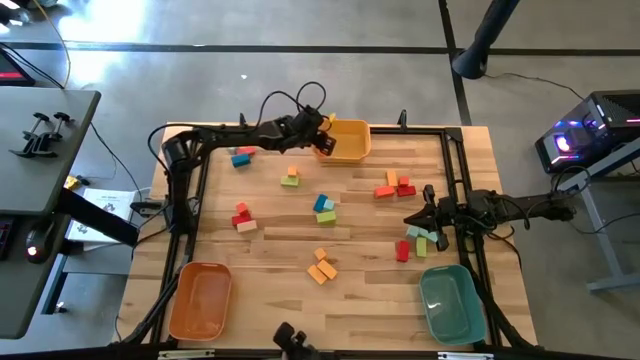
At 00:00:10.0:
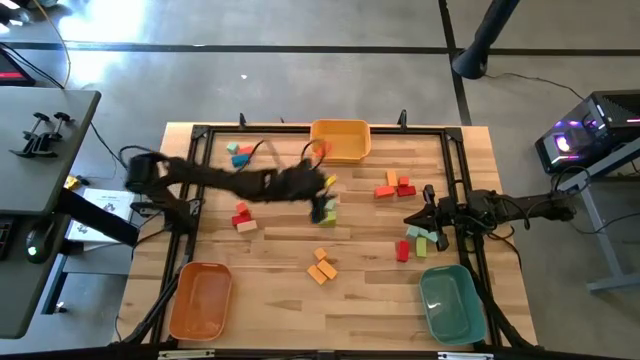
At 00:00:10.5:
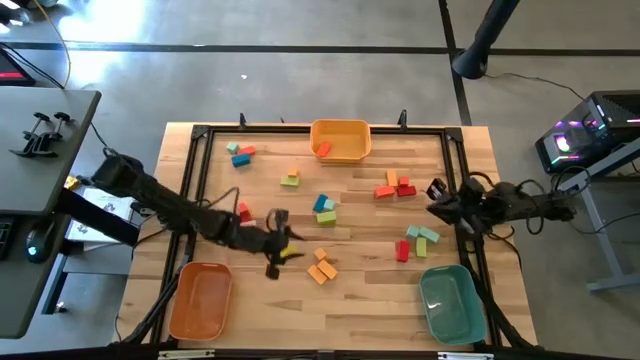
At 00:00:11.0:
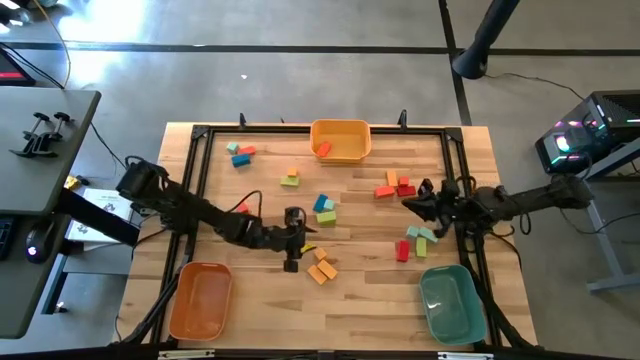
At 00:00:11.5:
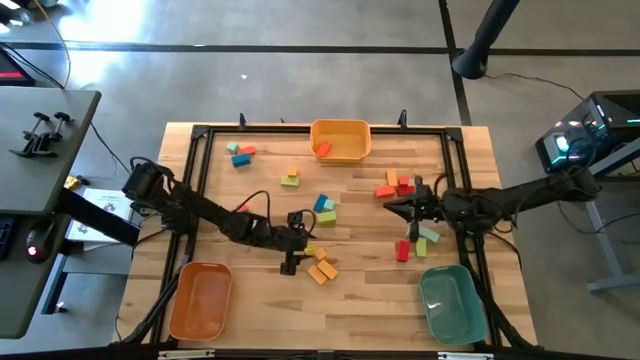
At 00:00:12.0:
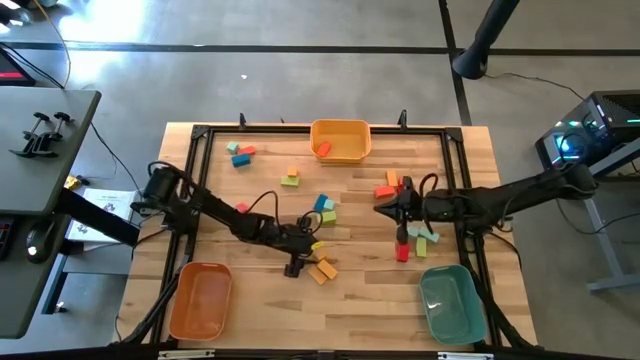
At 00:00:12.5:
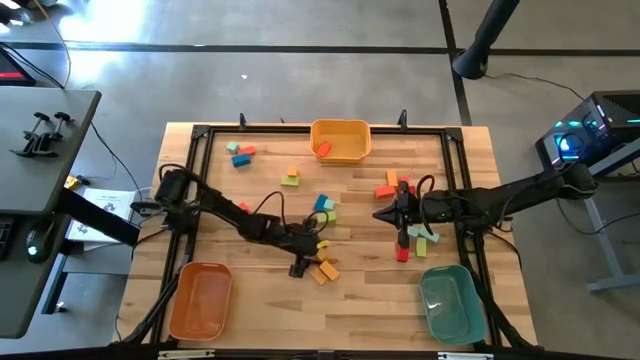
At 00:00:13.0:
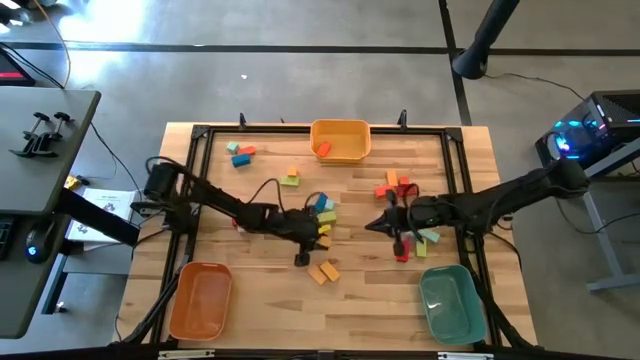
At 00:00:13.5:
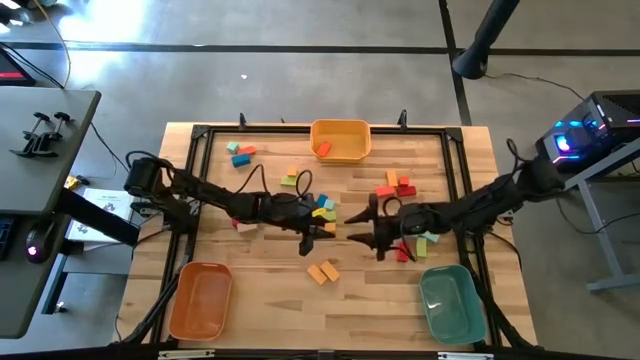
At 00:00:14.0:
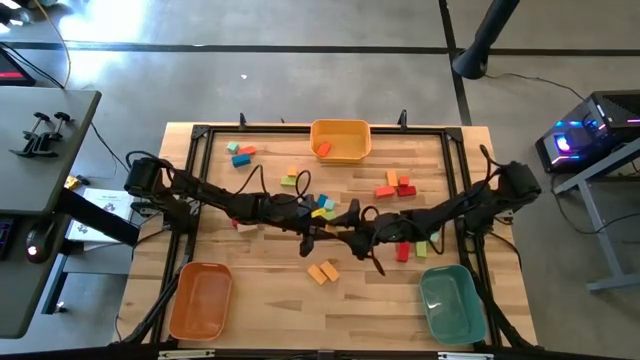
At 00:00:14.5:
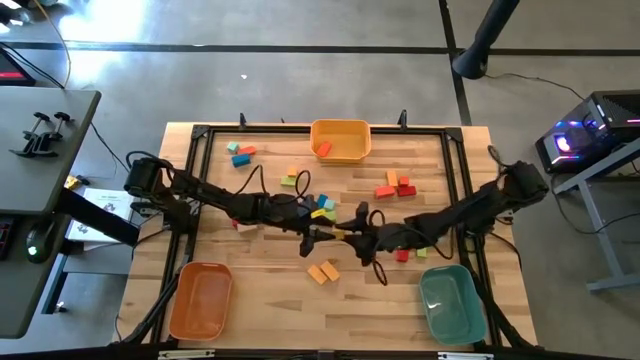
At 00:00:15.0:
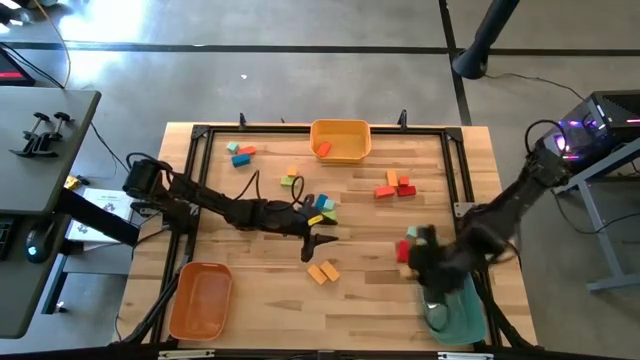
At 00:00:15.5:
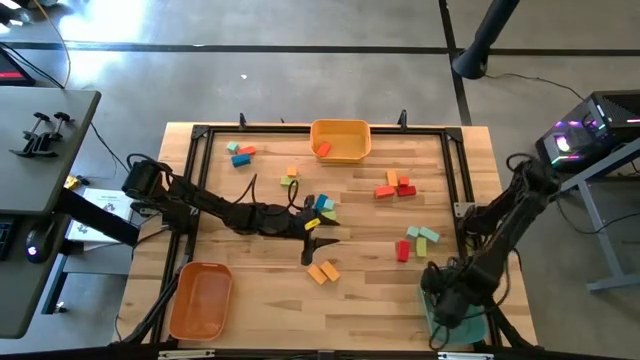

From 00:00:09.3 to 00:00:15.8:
Task: Sort blocks by size
Put the bottom yellow square block into the blue bin

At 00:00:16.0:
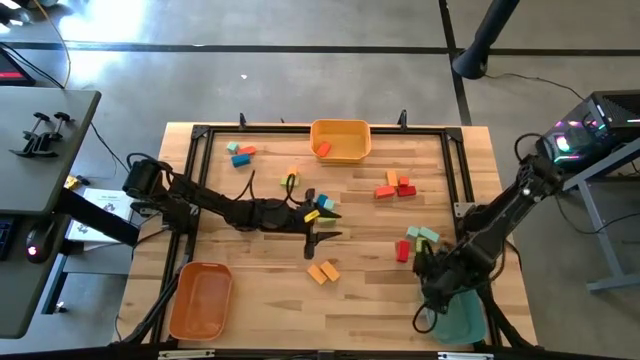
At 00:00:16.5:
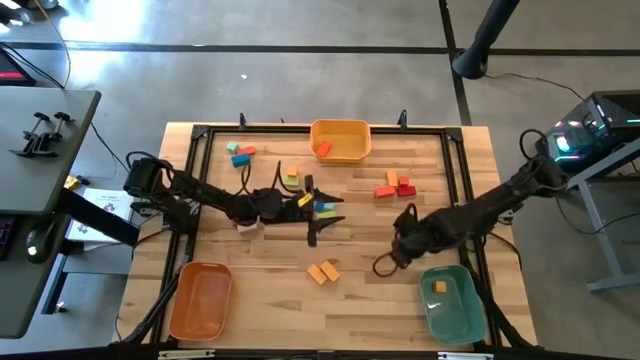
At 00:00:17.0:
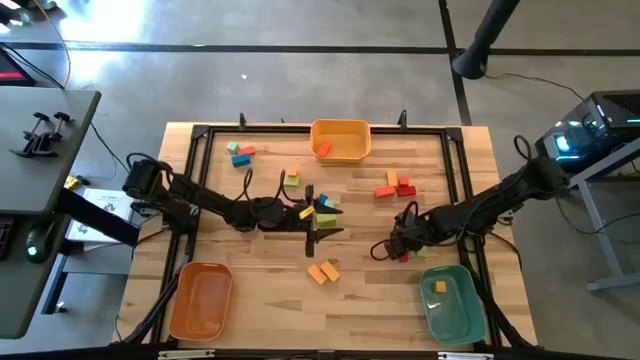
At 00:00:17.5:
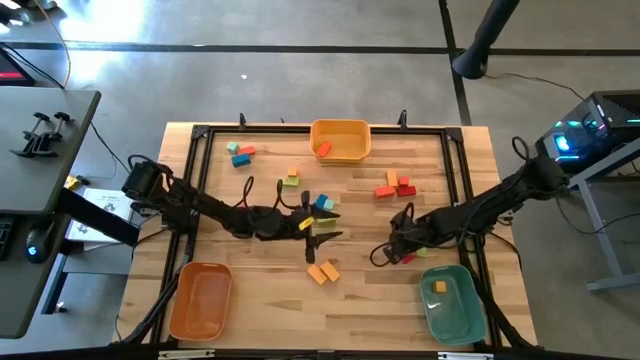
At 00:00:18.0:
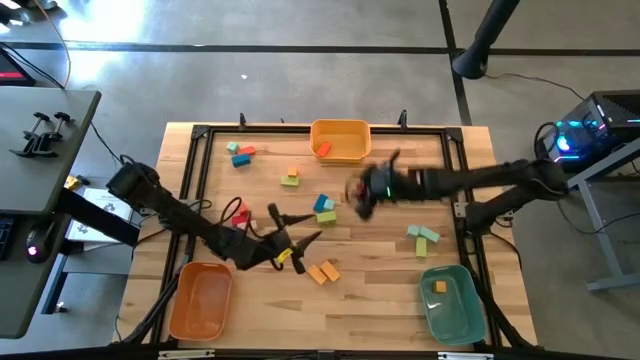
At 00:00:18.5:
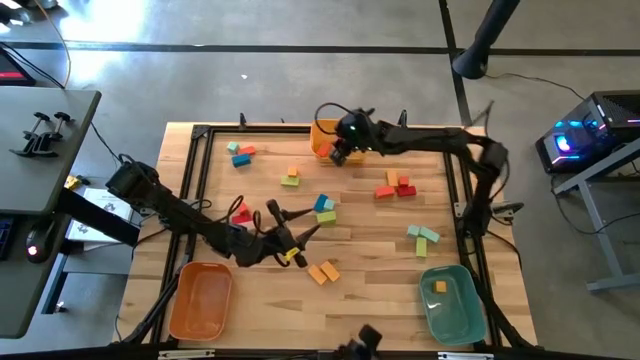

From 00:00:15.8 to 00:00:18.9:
Put the red wide rectangular block into the yellow bin

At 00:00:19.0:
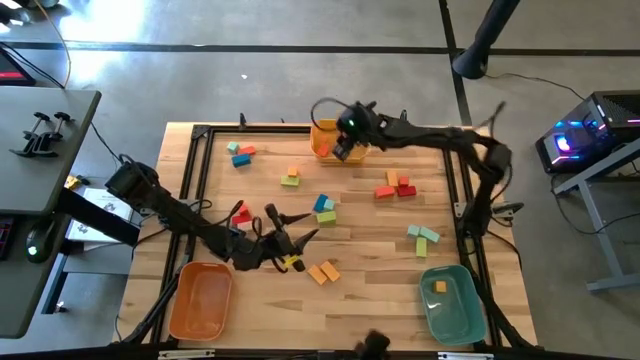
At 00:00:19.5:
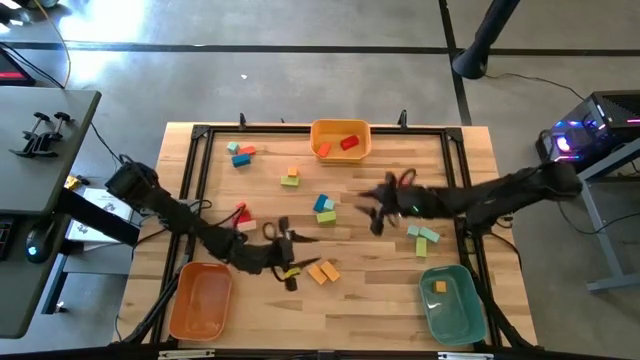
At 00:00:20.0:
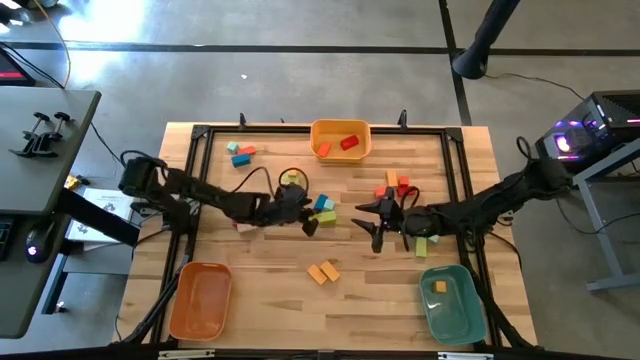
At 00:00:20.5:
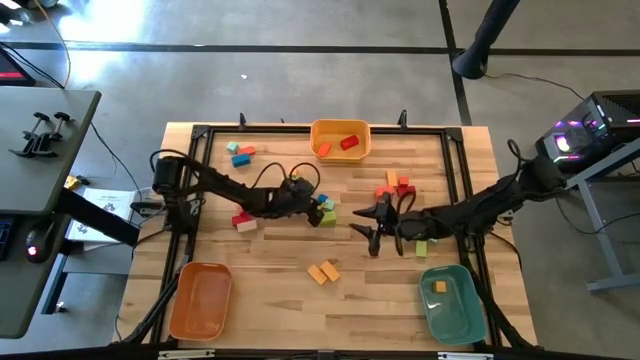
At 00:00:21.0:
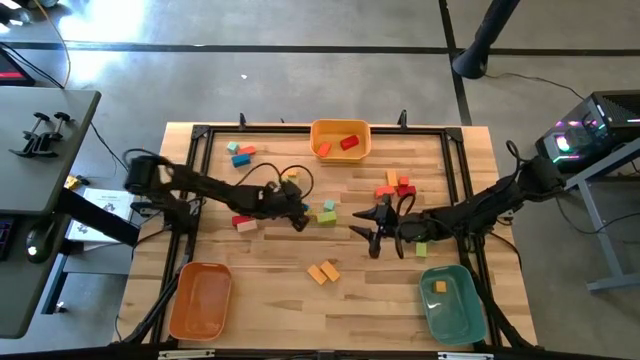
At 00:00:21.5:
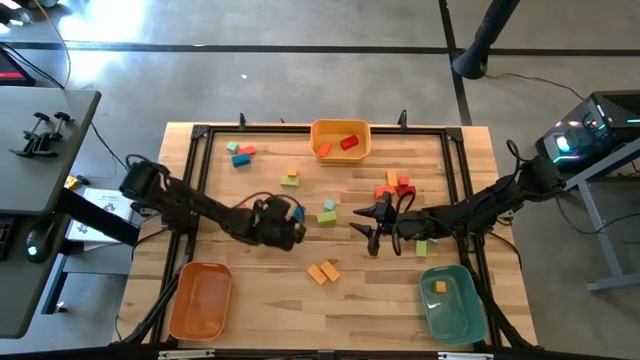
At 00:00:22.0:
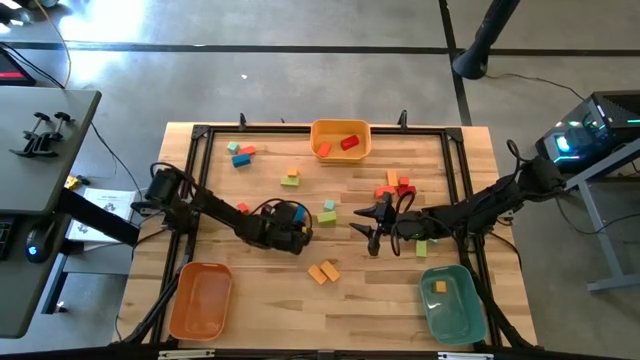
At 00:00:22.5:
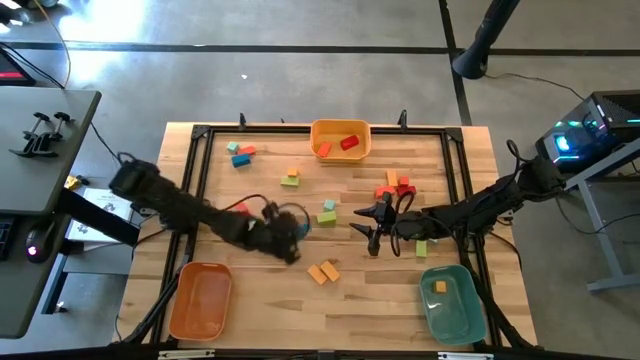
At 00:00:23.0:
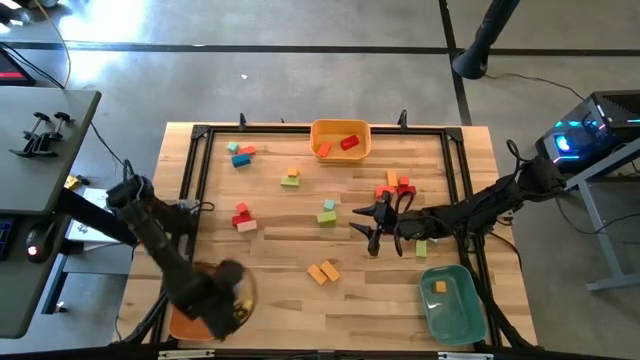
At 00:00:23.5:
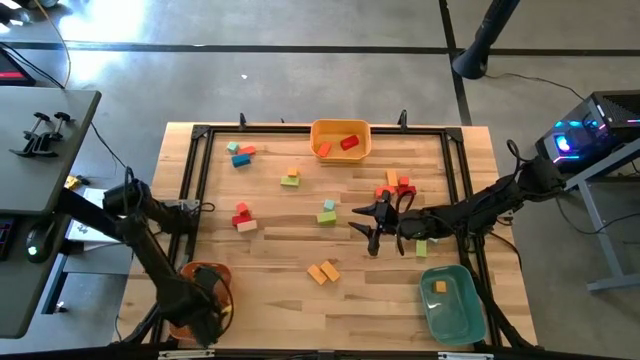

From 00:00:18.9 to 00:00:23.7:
Put the blue narrow rectangular block into the orange bin

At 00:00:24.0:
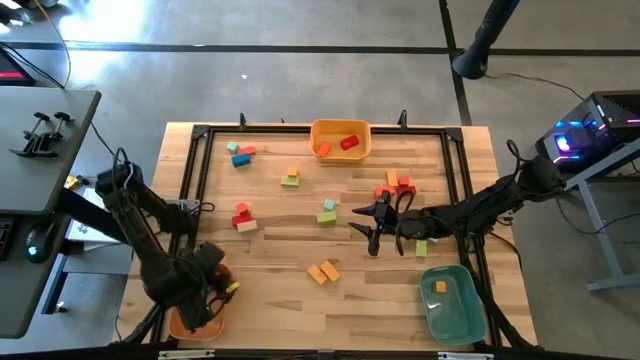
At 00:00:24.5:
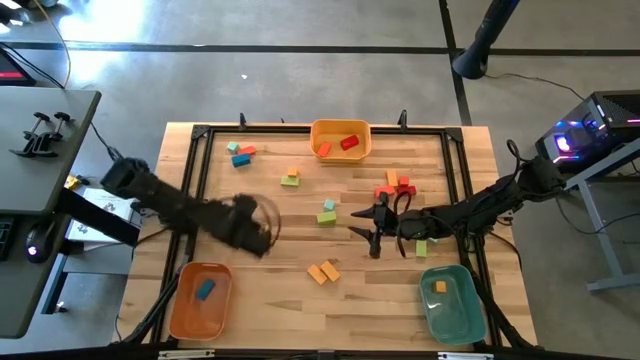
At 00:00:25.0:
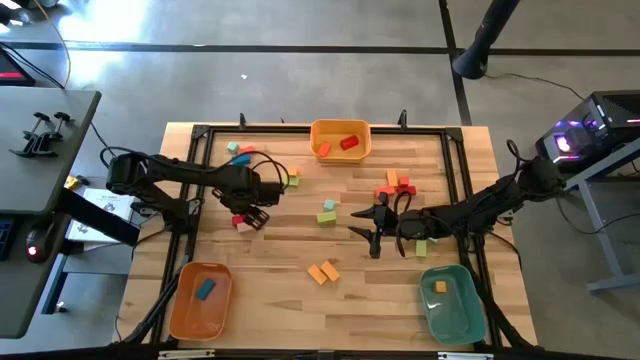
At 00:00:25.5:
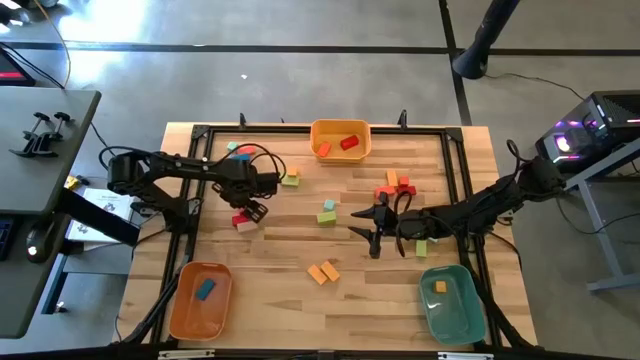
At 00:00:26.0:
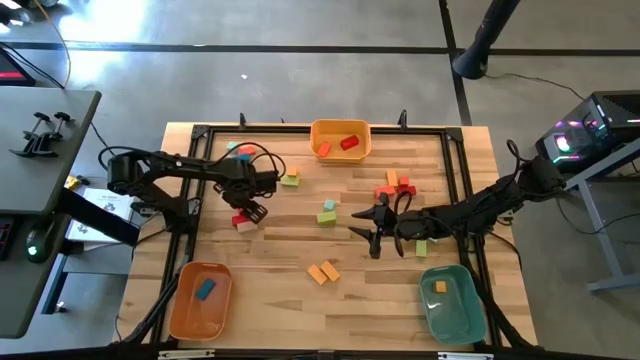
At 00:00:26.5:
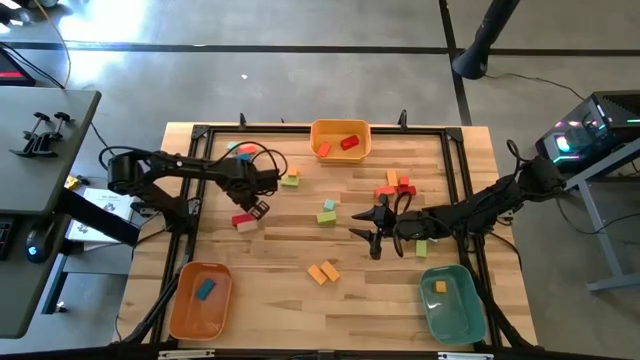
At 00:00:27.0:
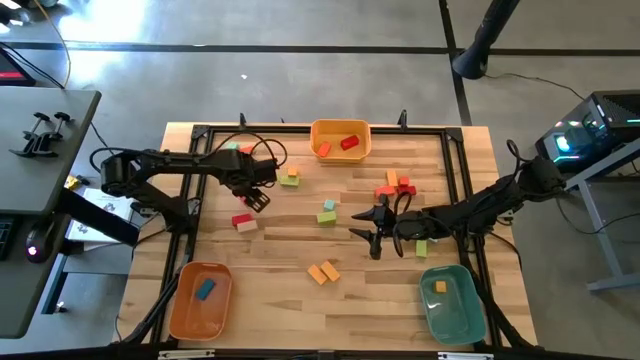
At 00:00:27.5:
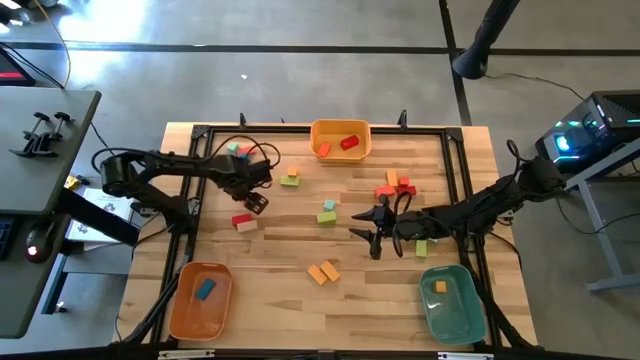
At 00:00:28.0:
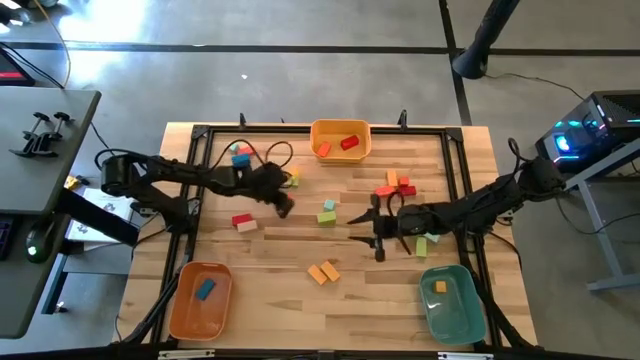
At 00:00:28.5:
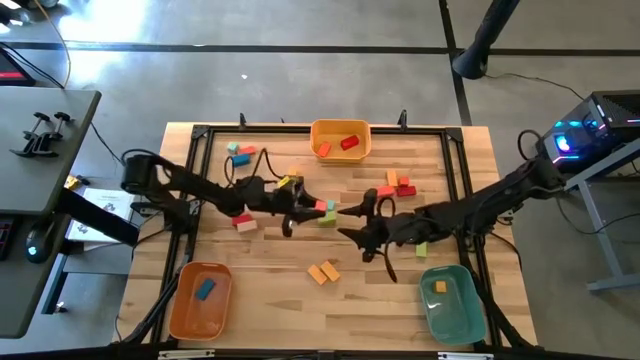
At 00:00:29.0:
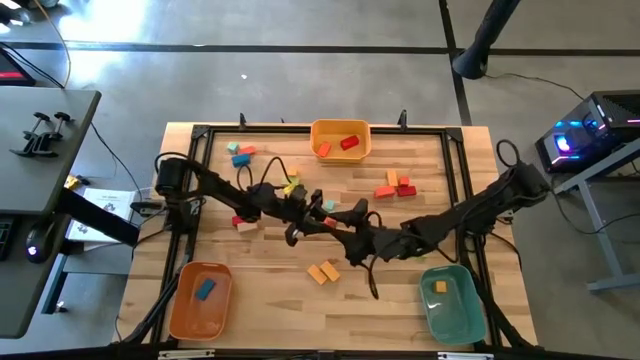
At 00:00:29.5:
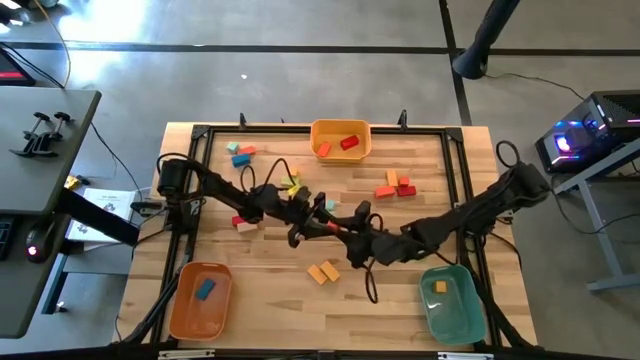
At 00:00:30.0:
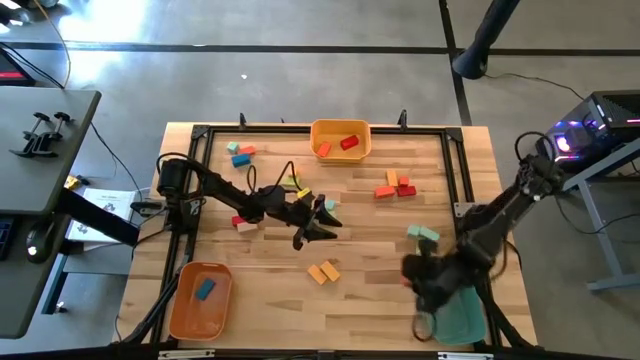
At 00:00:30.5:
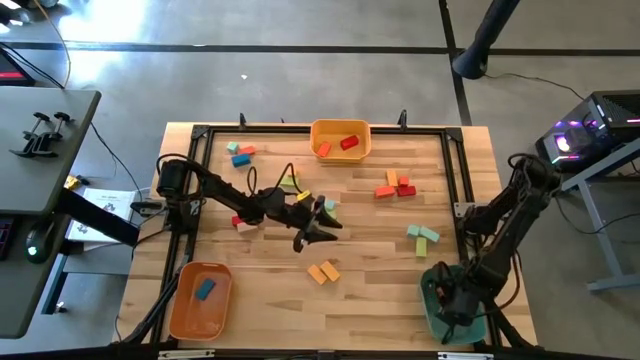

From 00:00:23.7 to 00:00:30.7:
Put the left orange square block into the blue bin
